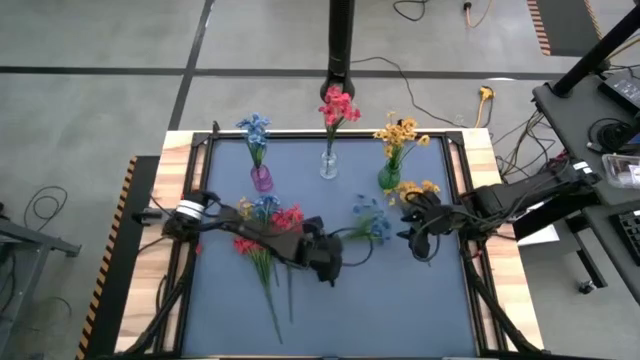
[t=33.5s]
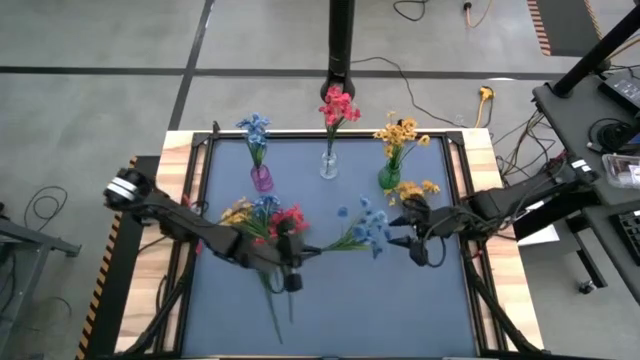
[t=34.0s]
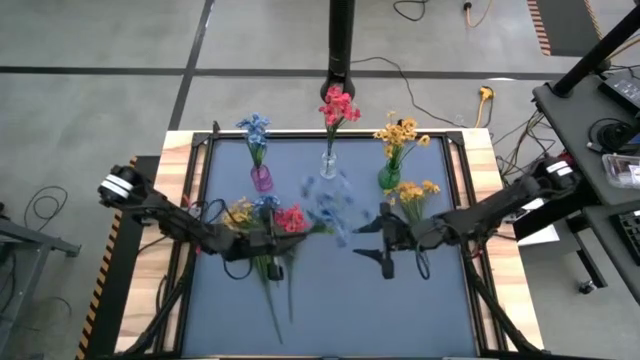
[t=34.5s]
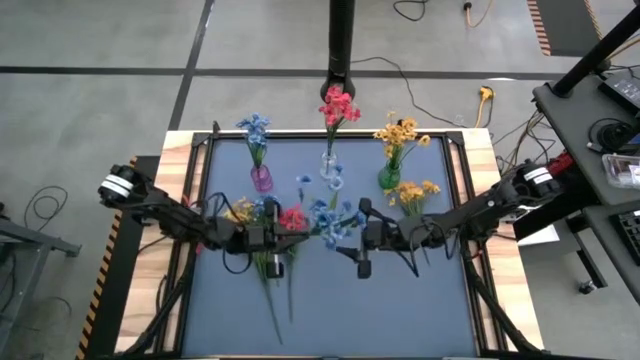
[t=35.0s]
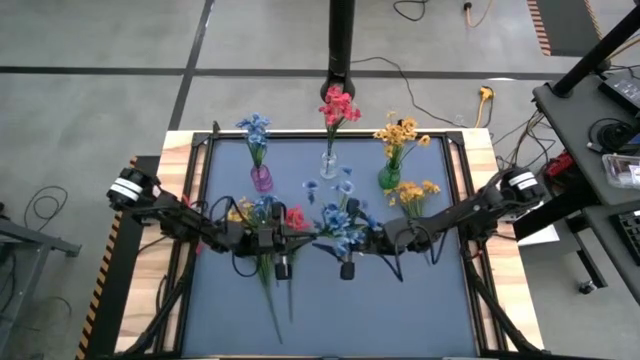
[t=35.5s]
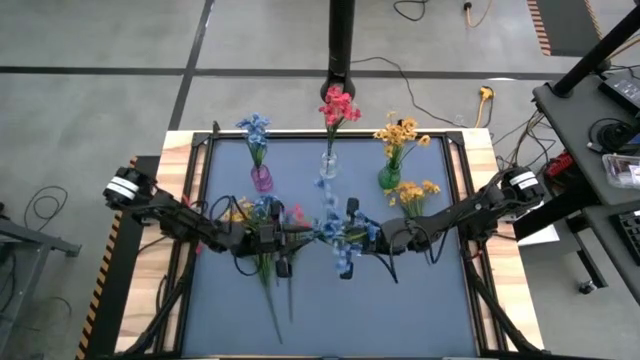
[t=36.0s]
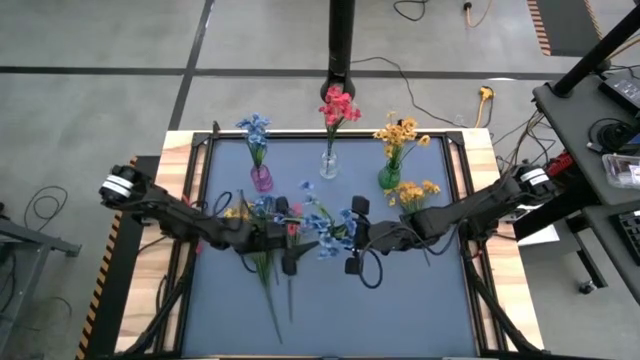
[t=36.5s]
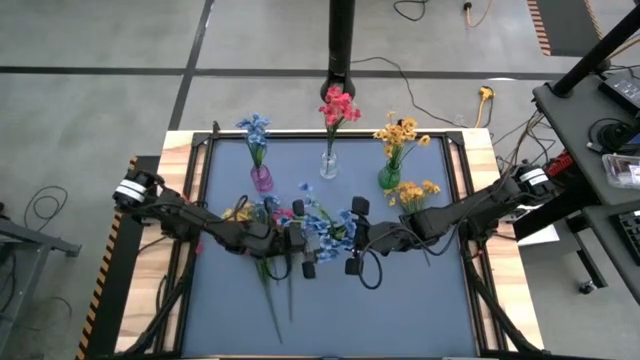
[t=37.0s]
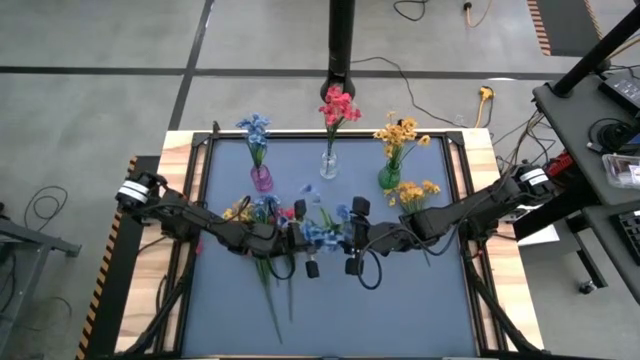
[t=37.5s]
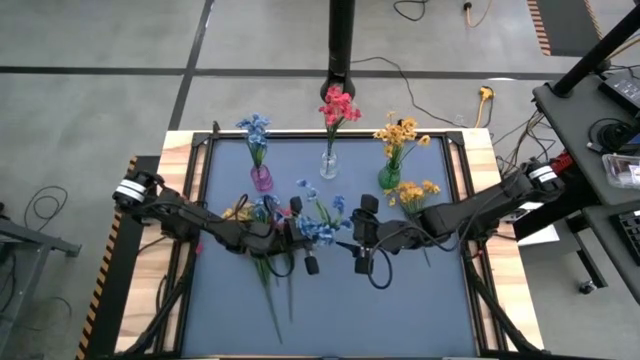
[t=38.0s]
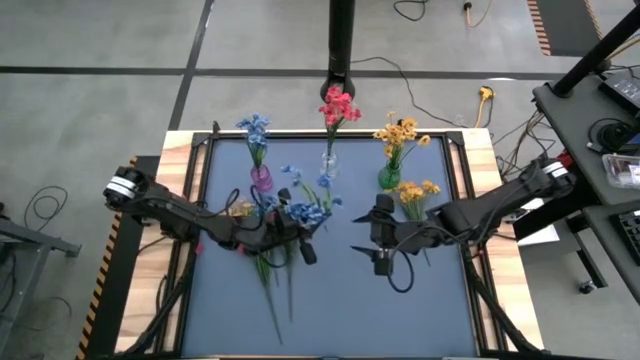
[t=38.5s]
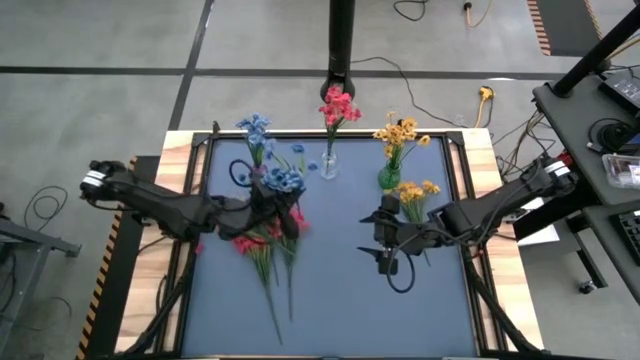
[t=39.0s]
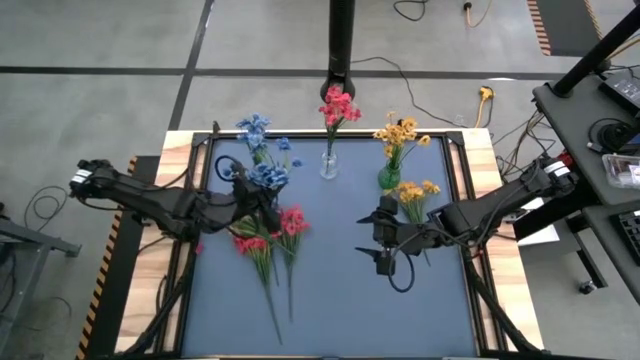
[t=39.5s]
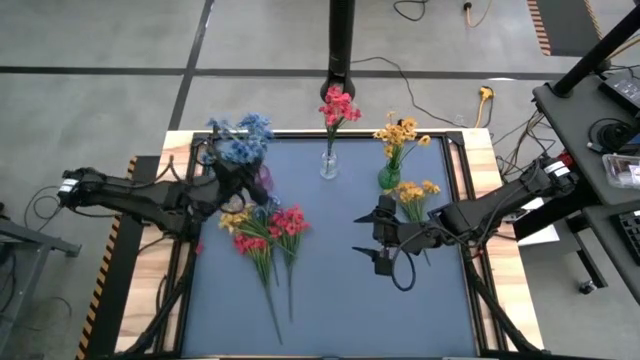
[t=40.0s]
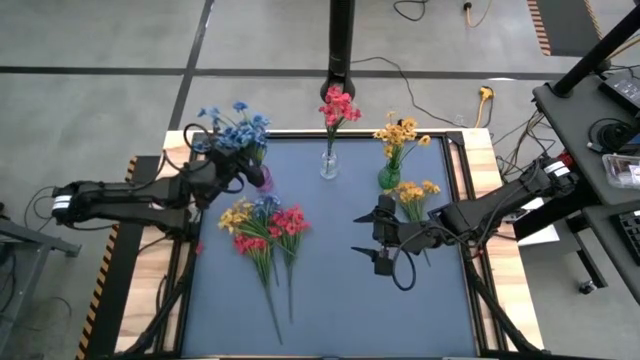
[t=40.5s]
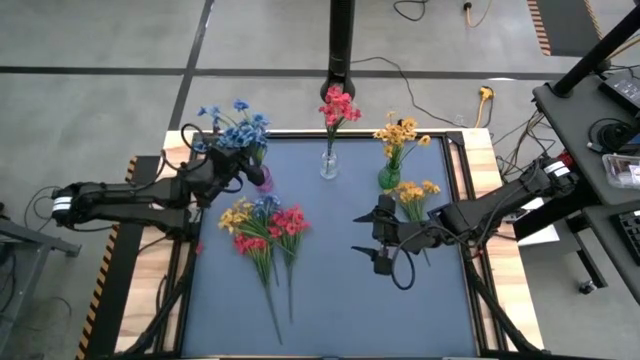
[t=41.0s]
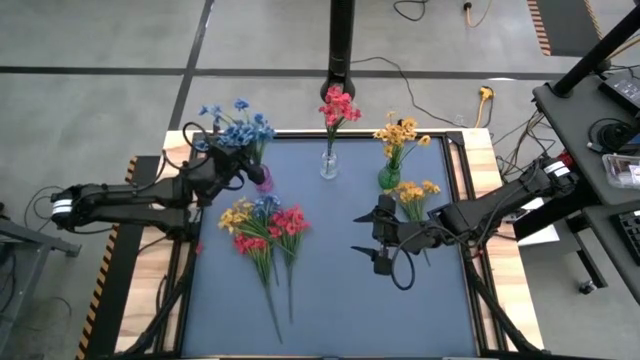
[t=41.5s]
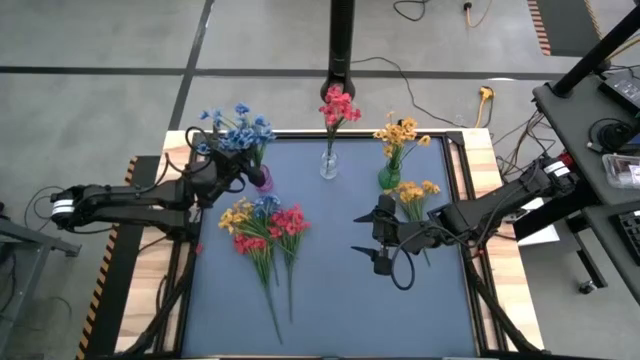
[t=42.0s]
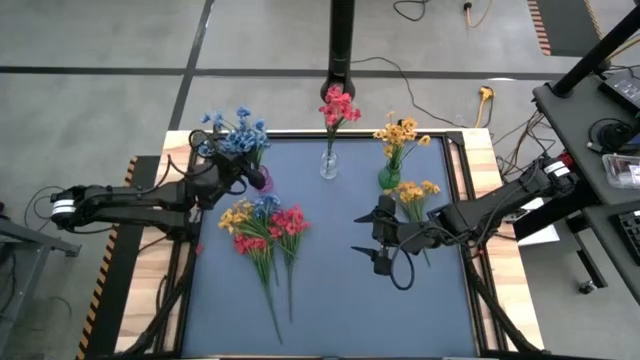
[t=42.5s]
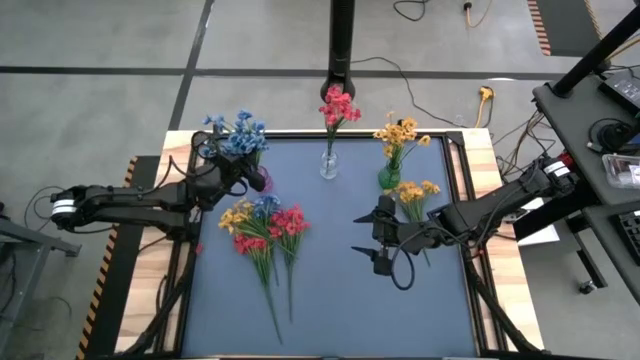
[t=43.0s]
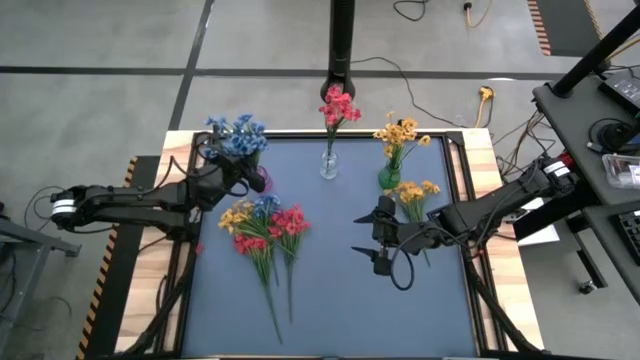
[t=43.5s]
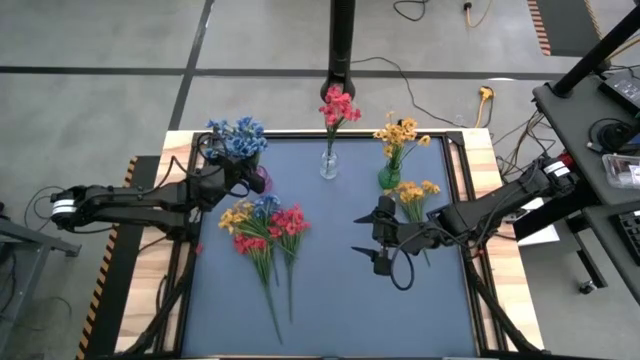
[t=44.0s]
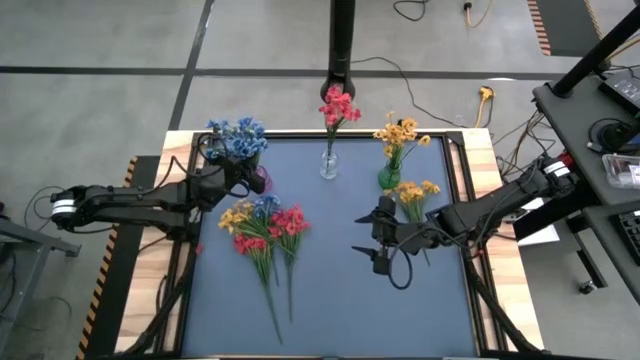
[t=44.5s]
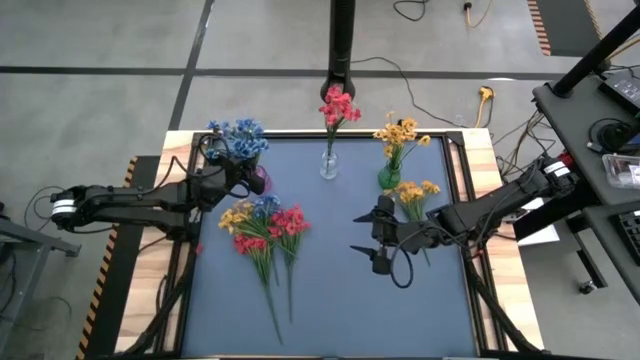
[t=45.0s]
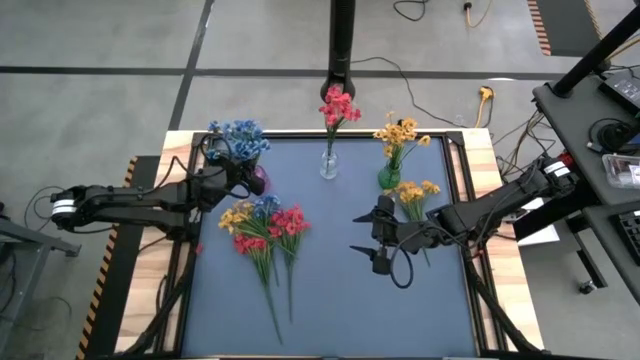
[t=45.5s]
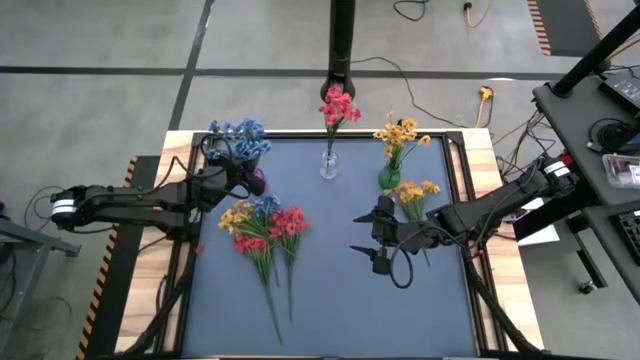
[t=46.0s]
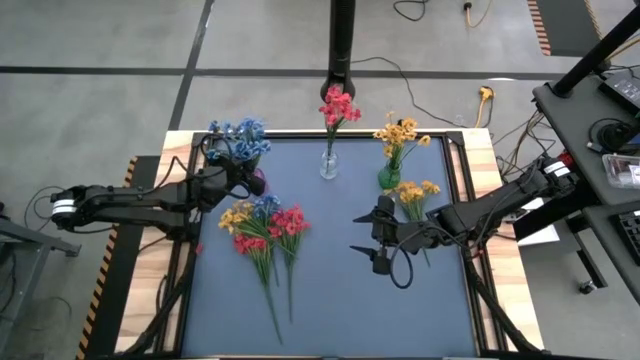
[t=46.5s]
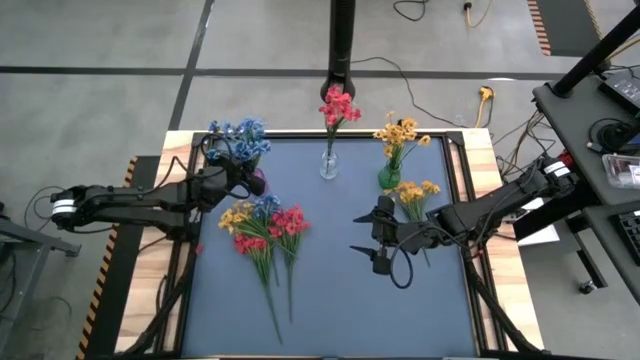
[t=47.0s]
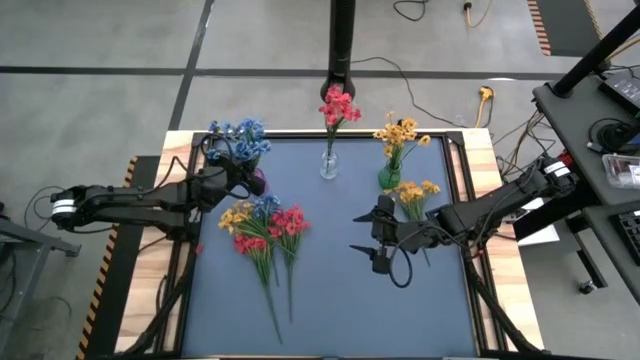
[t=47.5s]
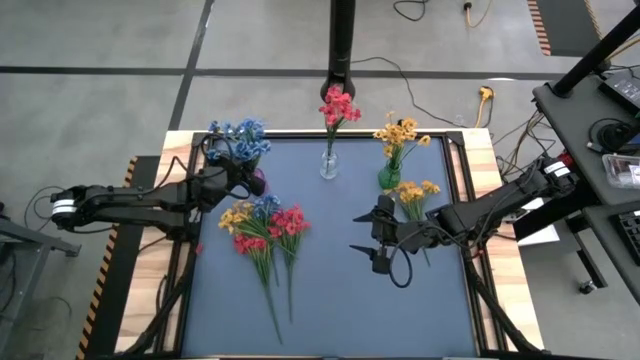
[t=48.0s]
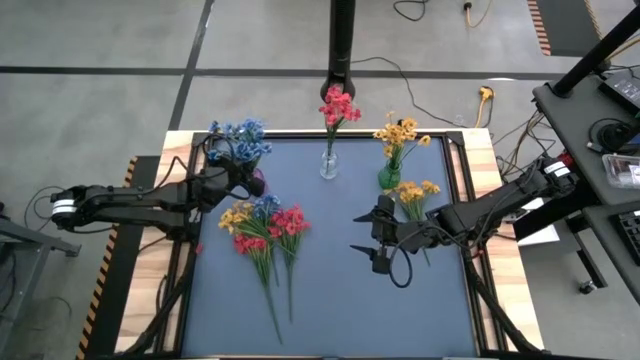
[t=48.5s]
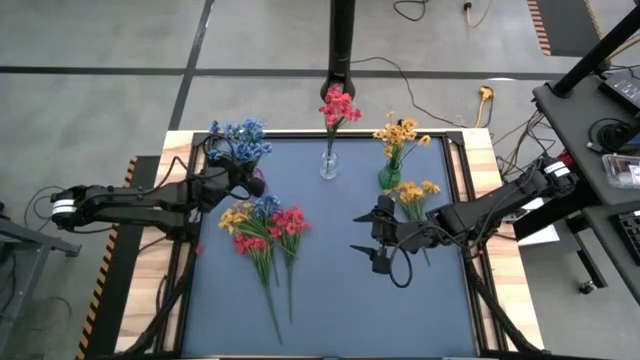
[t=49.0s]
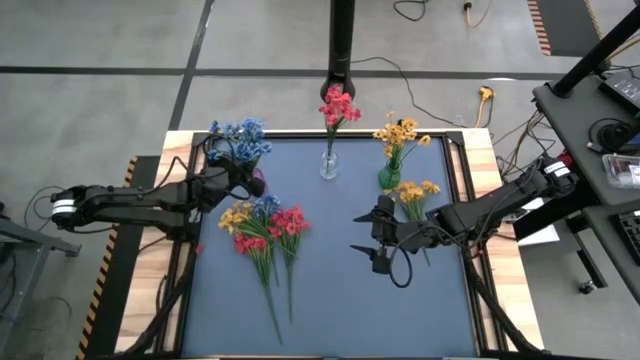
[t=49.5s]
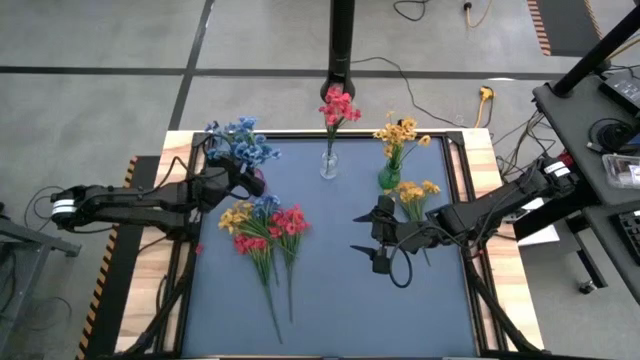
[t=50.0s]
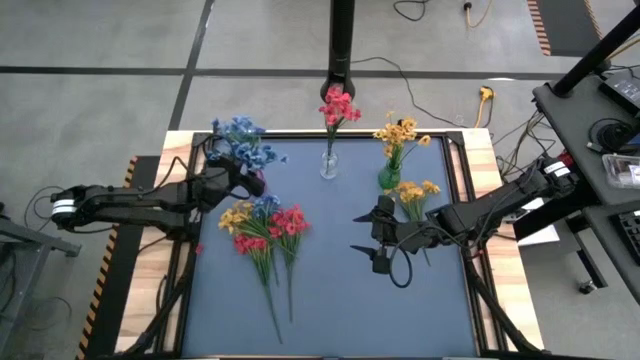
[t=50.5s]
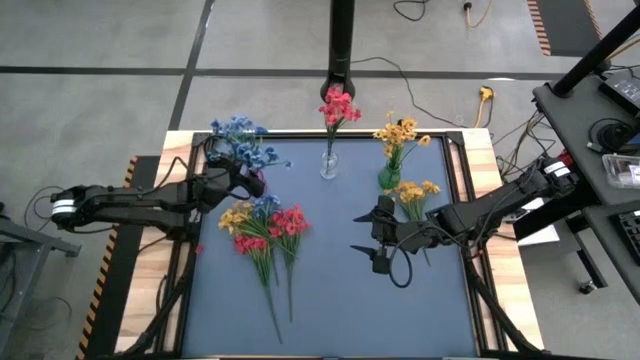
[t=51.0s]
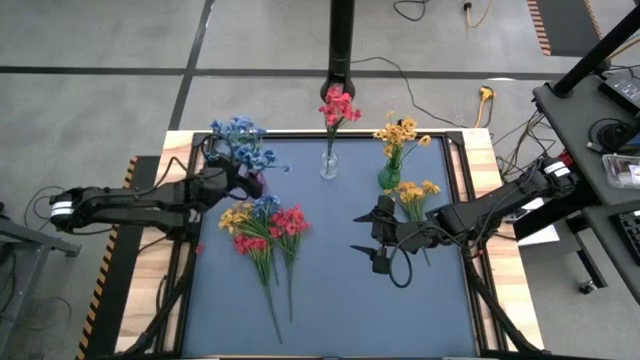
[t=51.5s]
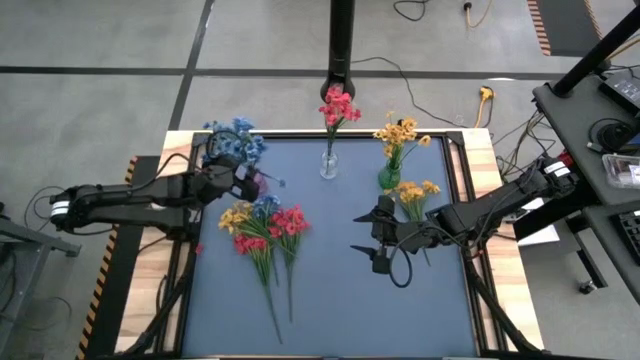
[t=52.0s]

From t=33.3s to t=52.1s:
Task: Sort flowers into vase by color
Put the right blue flower into the purple vase

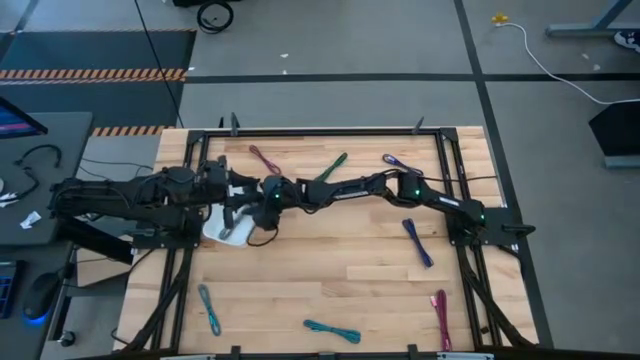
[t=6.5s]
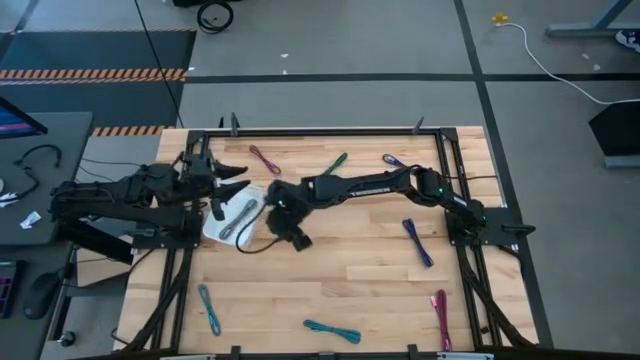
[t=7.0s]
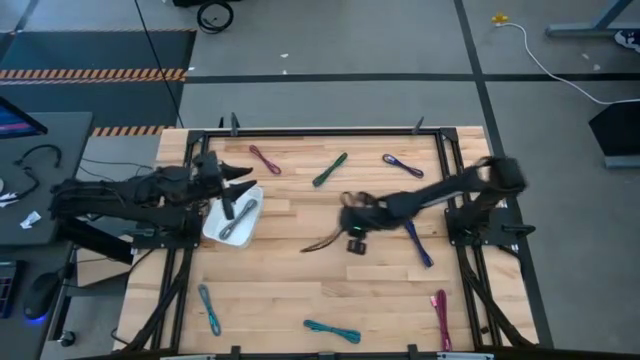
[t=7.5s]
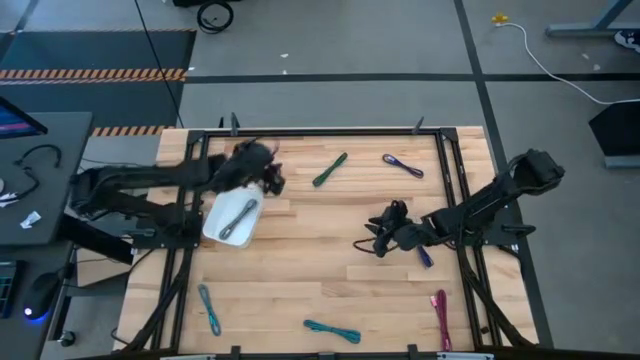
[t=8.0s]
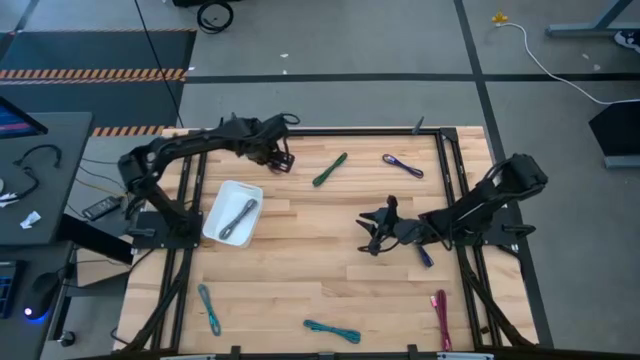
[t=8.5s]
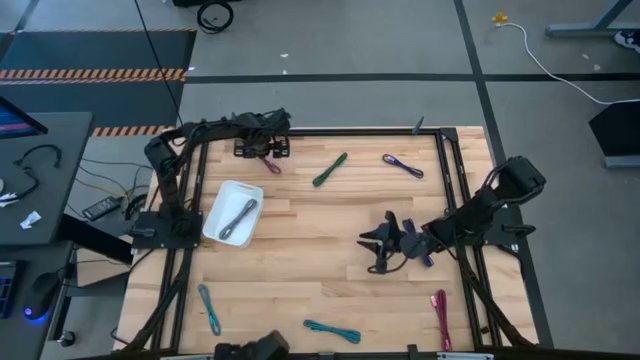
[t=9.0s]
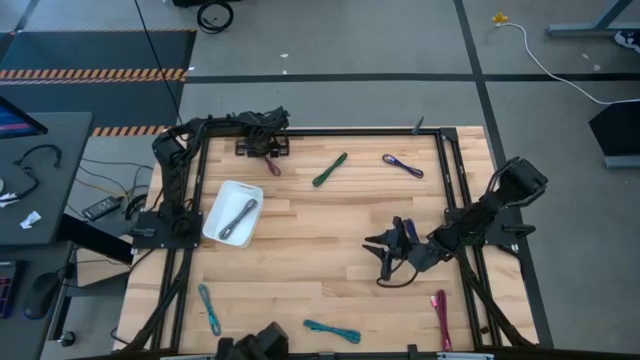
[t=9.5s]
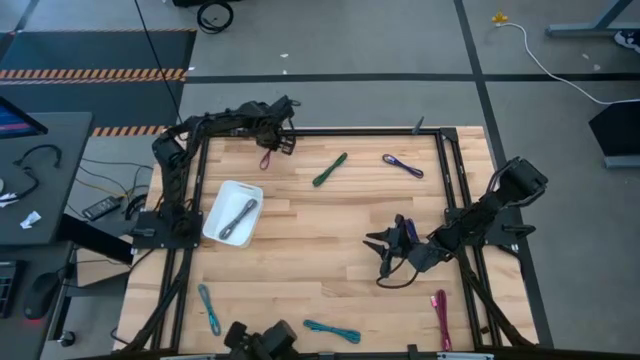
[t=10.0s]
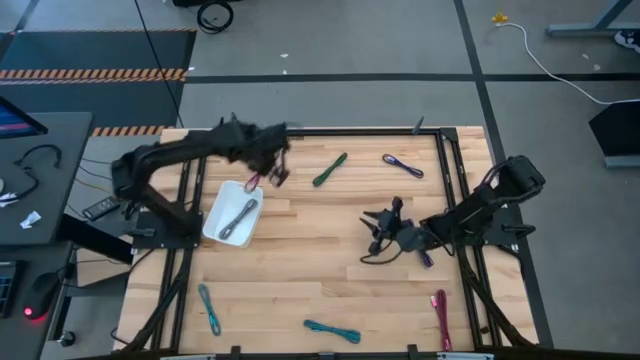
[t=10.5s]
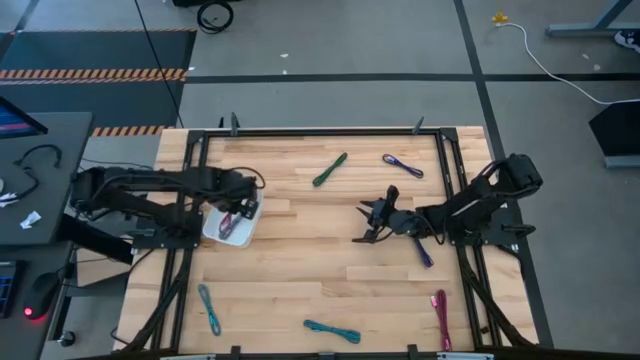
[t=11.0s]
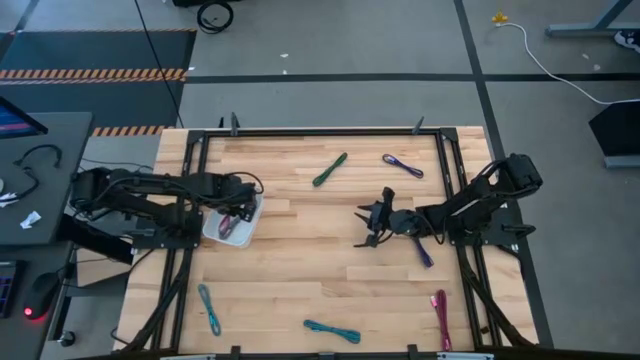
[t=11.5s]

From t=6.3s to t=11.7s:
Task: Pick and place USB-C Cables
Put the top pink charger cable into the white bin
